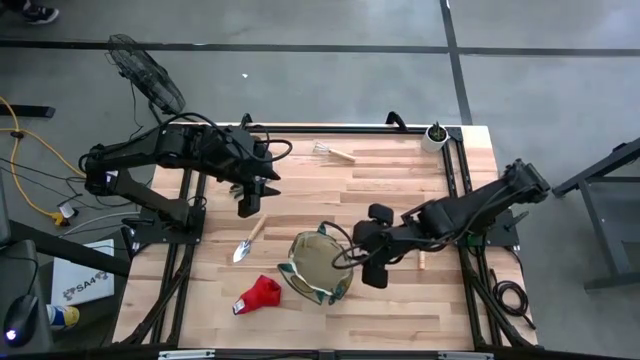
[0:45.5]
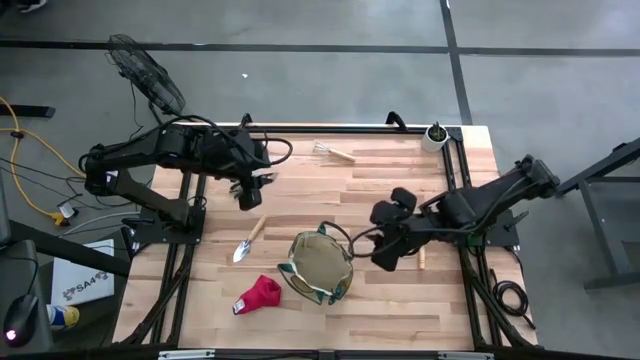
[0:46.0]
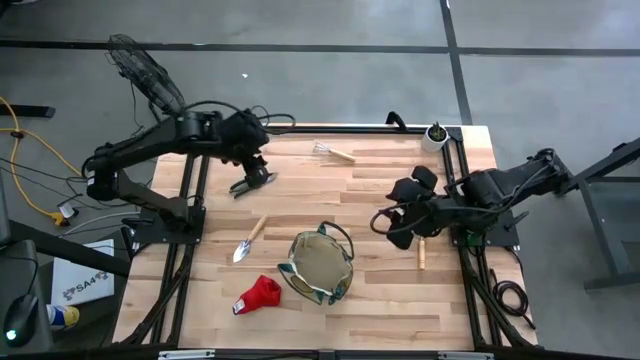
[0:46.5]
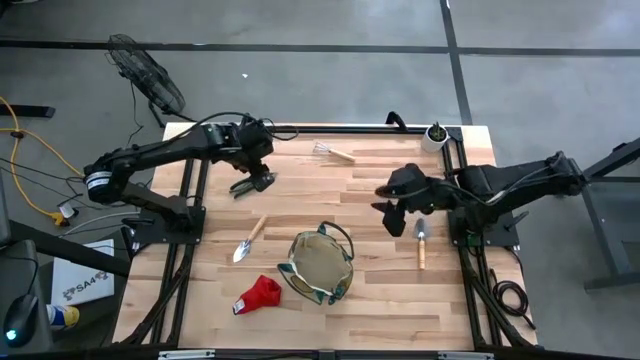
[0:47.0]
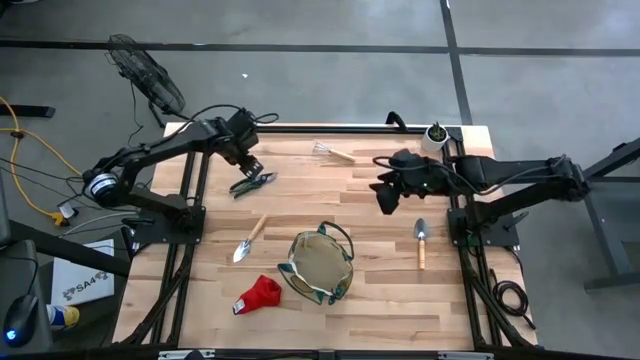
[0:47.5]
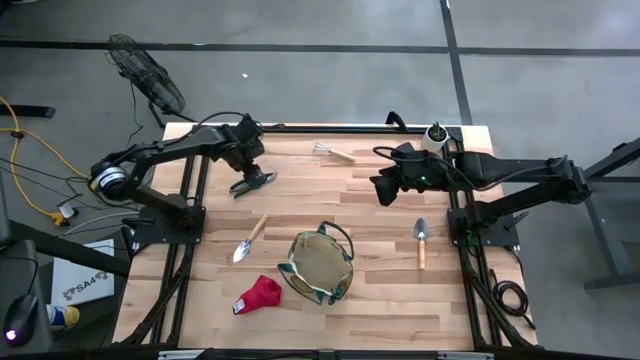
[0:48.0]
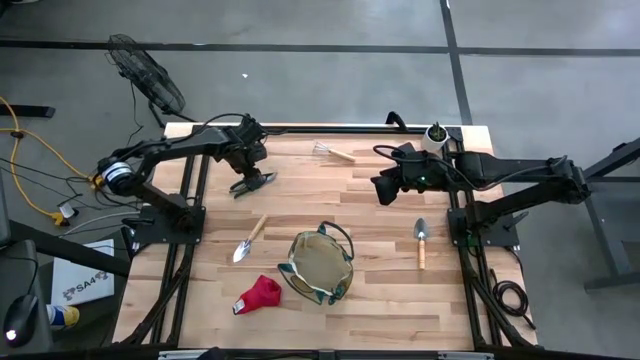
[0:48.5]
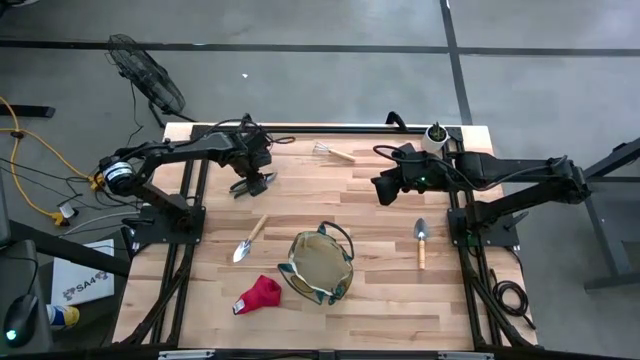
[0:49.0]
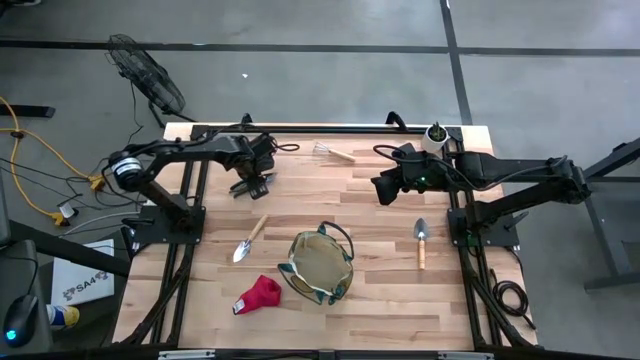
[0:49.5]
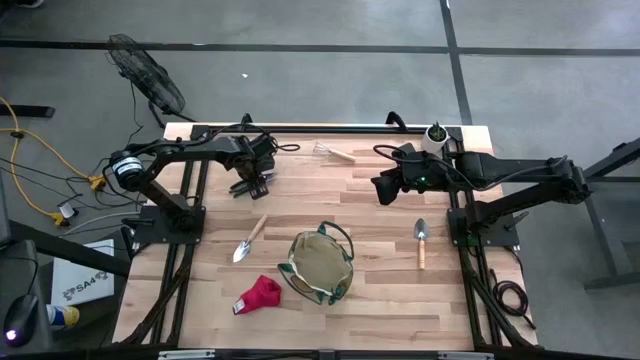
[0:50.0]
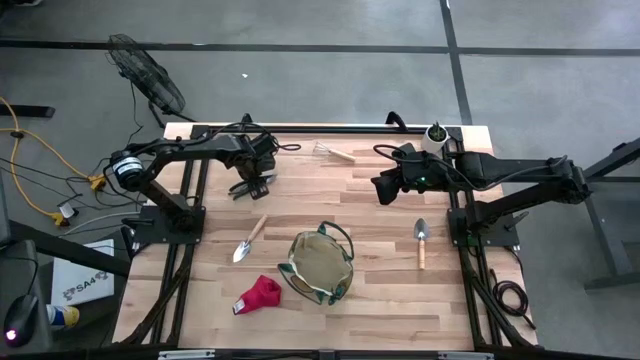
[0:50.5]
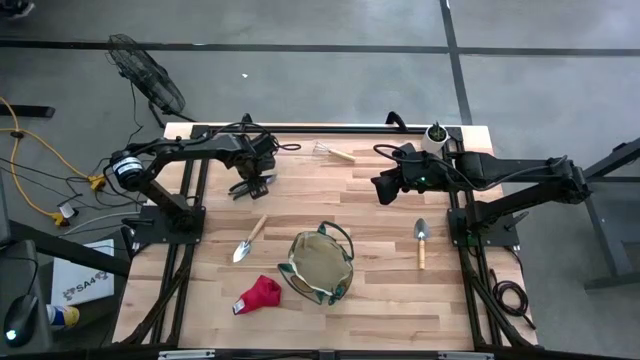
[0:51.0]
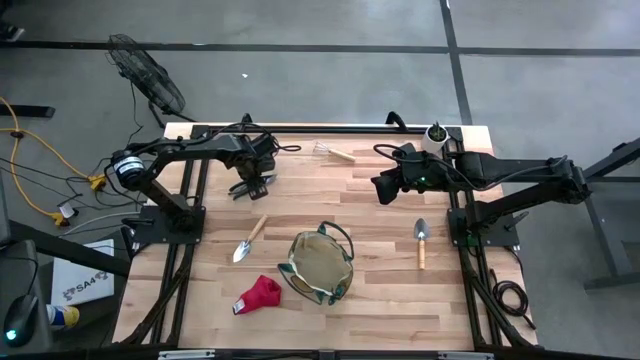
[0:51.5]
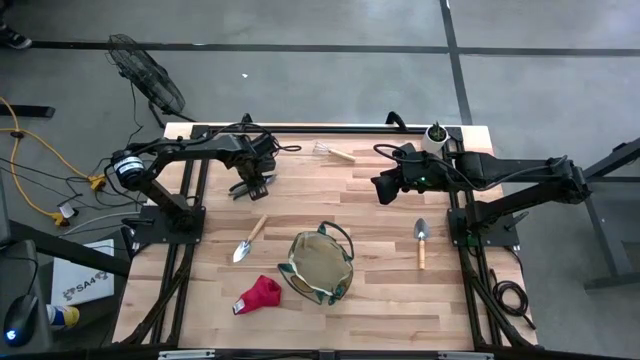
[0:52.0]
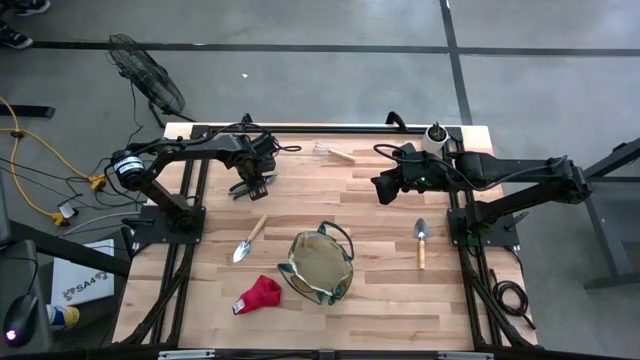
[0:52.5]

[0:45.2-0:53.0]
Task: Pick & Place Garden tools in Gardening bag
Put the green shear scissors into the light brown gardening bag
